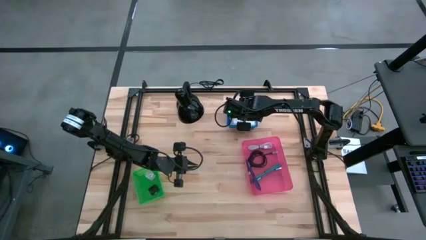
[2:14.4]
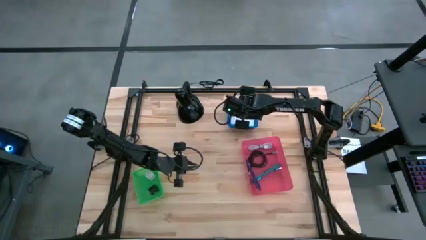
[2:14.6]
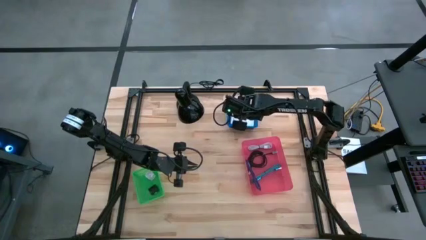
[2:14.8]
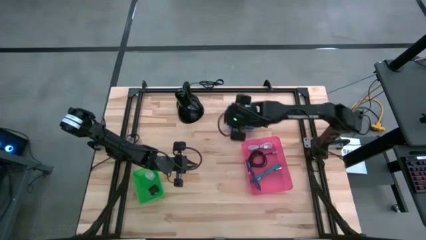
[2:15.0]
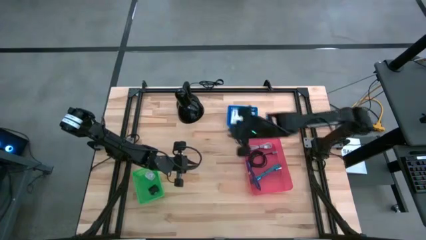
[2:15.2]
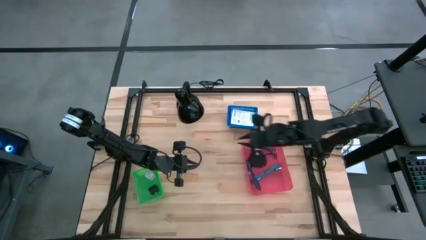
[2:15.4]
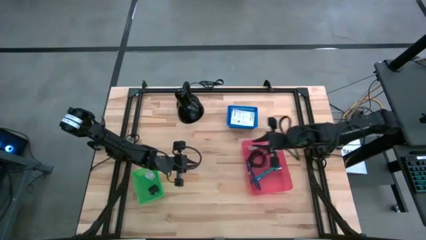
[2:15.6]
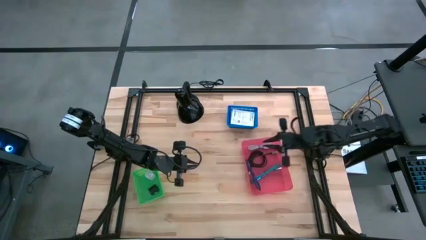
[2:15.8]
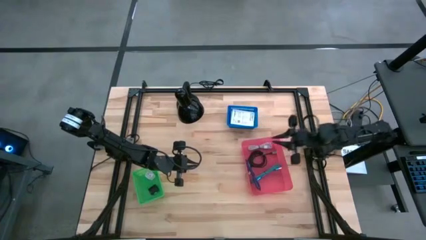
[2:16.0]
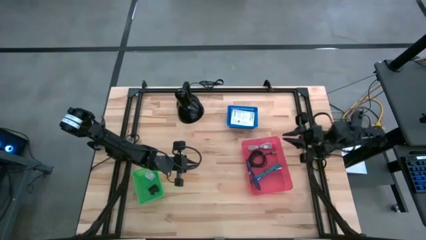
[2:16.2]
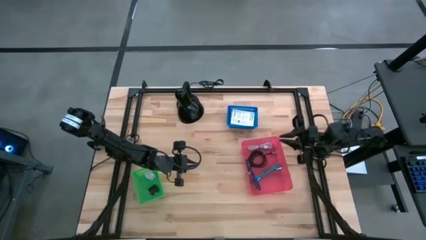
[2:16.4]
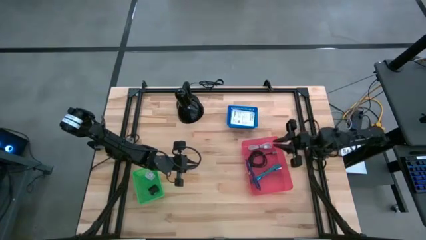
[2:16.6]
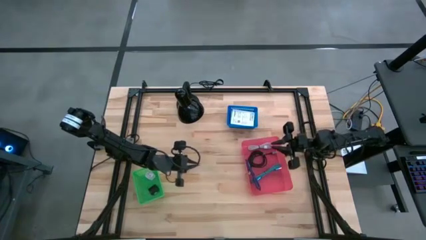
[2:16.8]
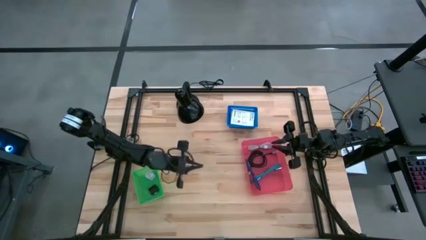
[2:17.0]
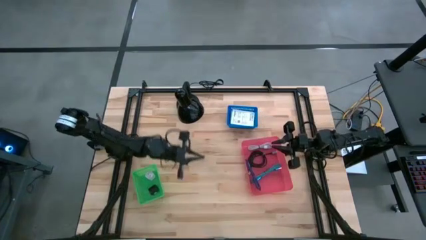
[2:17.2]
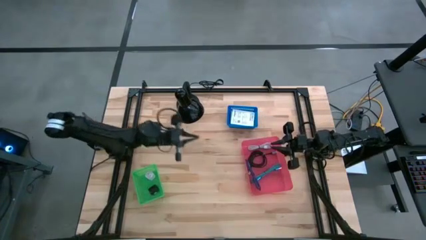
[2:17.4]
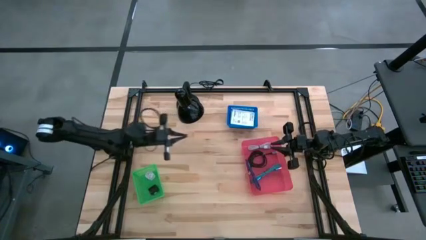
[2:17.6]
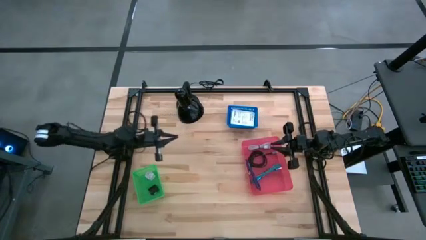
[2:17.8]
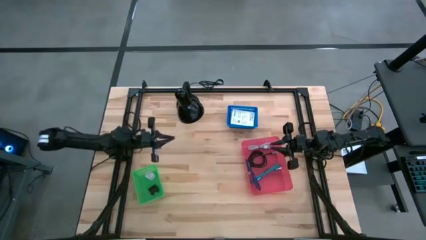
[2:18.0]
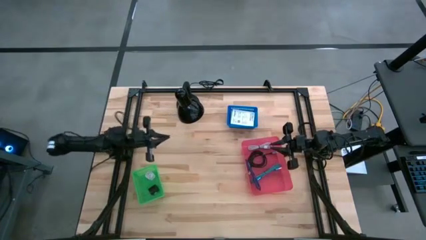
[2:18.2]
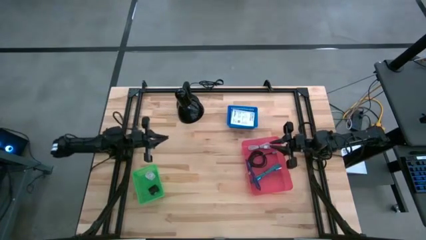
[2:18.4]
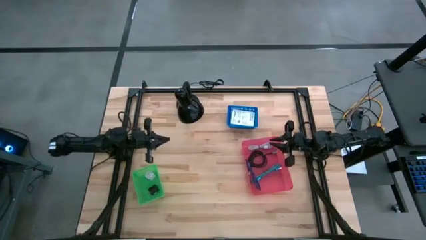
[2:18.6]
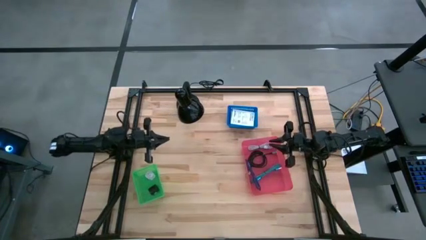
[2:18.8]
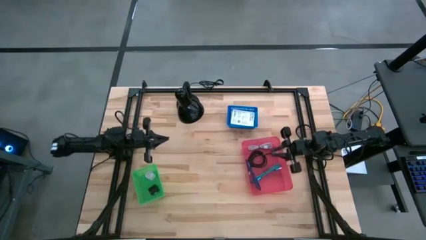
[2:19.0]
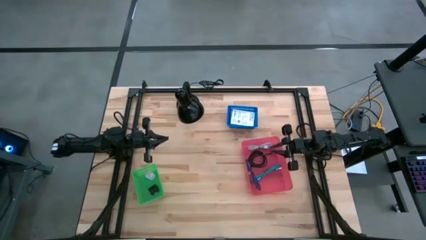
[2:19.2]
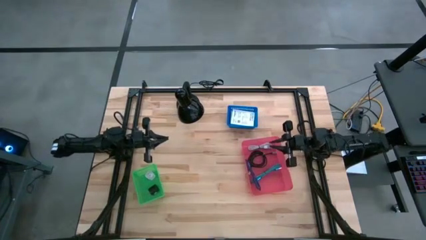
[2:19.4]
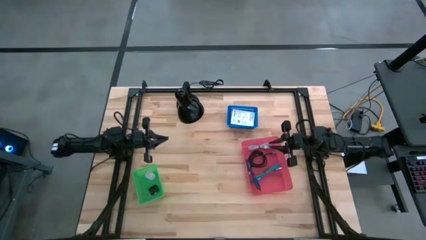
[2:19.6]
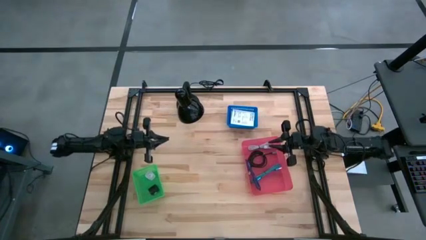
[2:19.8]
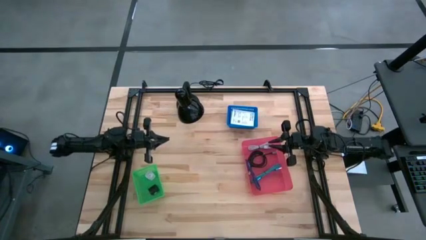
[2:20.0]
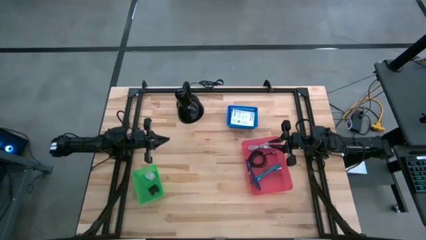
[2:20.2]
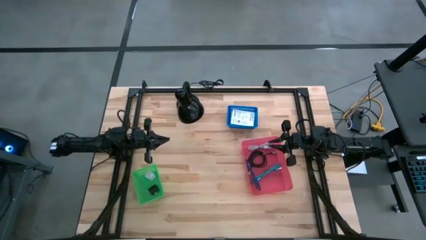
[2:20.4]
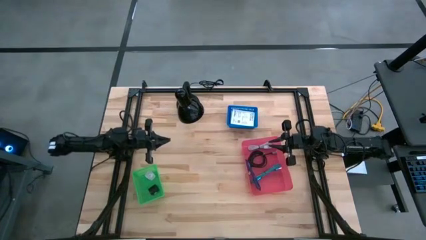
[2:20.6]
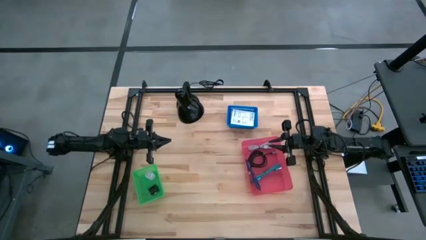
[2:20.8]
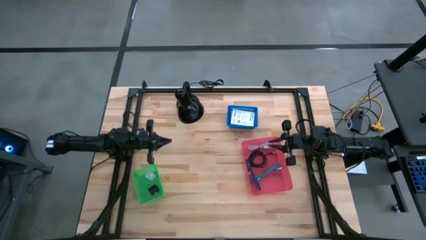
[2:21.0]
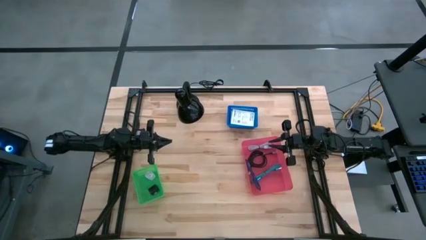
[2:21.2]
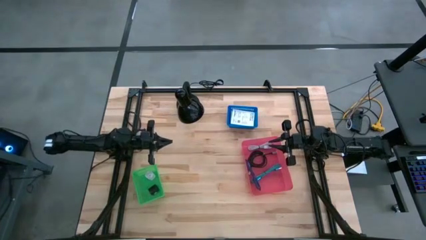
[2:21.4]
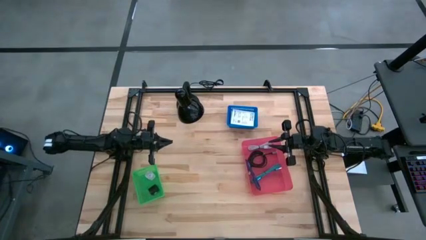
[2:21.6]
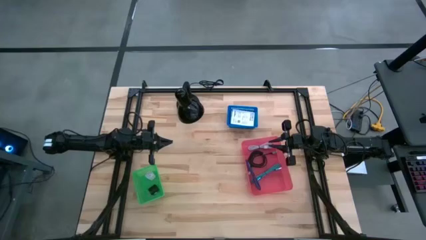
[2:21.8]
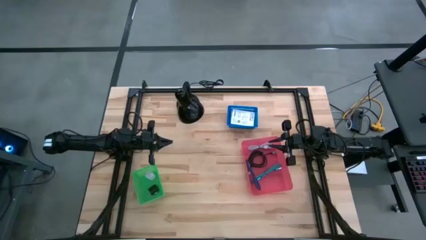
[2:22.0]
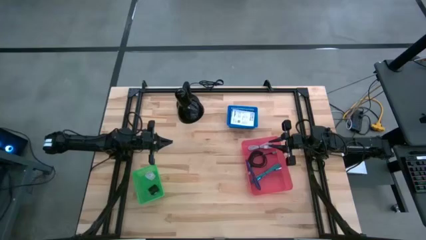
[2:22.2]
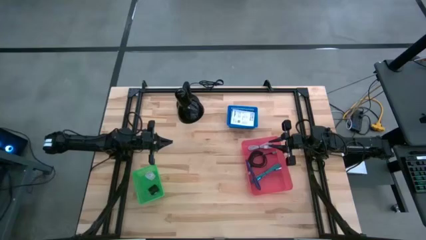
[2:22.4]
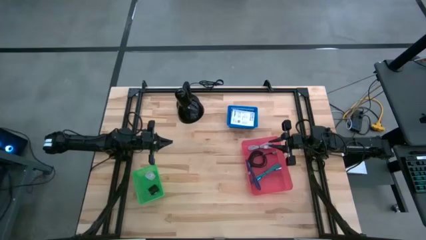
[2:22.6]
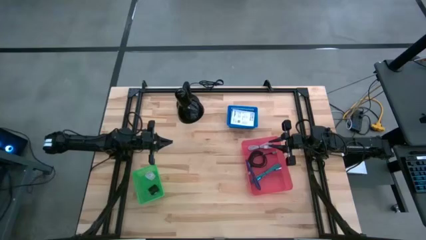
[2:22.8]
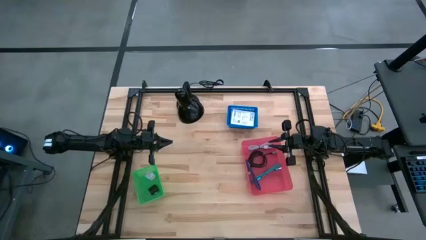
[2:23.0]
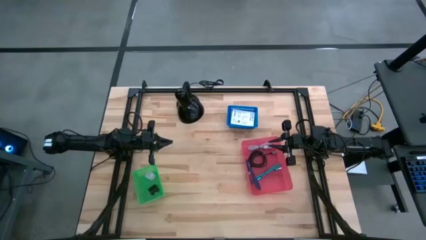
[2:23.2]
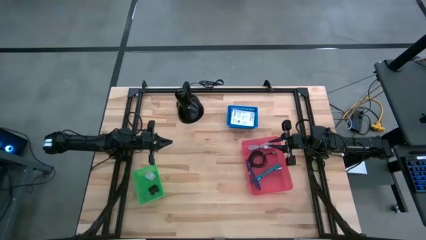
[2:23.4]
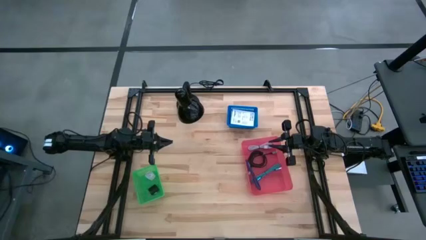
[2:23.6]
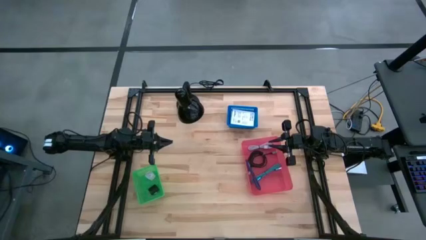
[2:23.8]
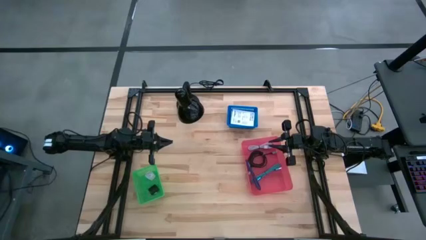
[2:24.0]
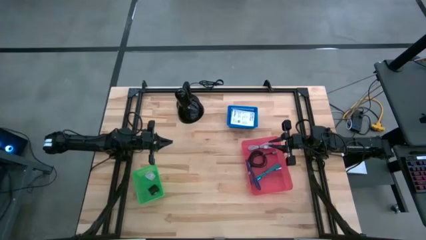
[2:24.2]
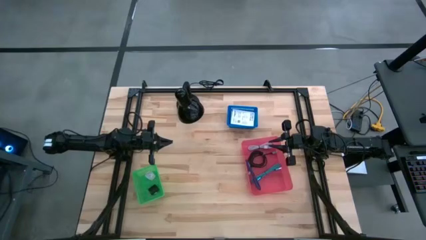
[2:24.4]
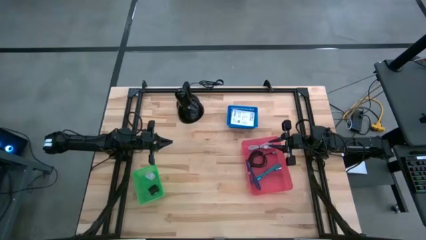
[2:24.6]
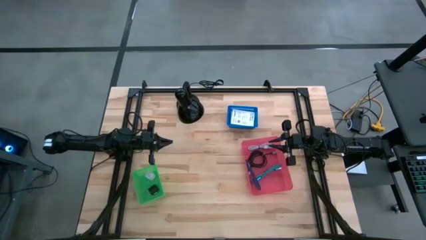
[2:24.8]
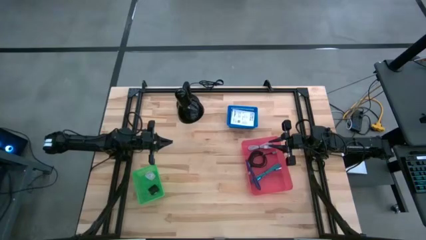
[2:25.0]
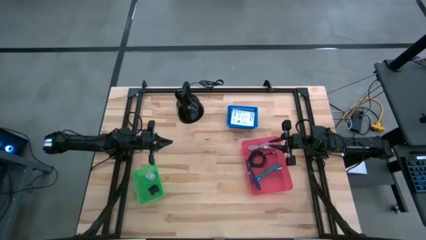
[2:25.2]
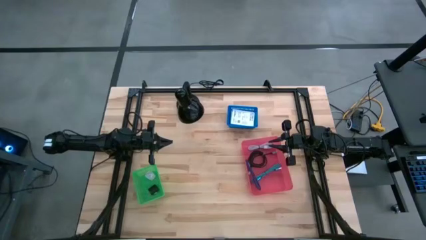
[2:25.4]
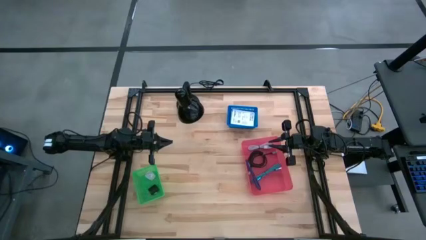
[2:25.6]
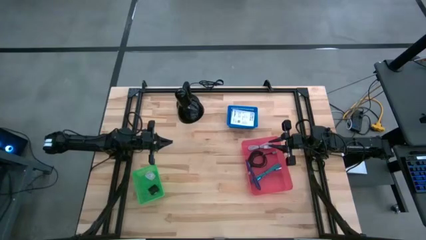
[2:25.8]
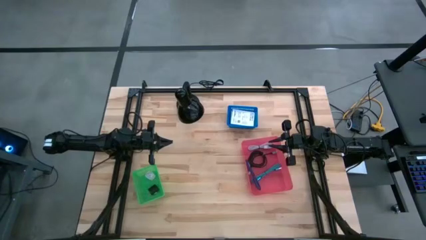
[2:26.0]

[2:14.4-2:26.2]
Task: Pick and place items into bin
Return to Home position

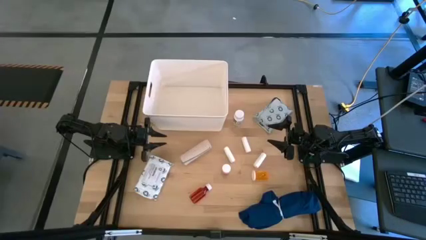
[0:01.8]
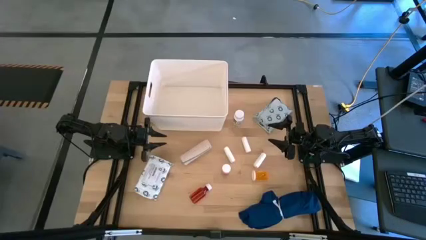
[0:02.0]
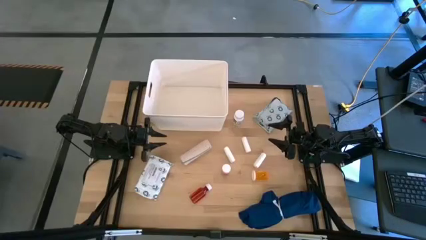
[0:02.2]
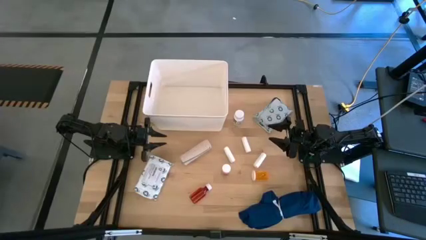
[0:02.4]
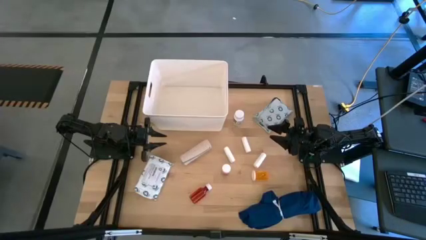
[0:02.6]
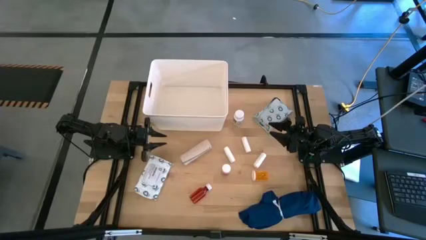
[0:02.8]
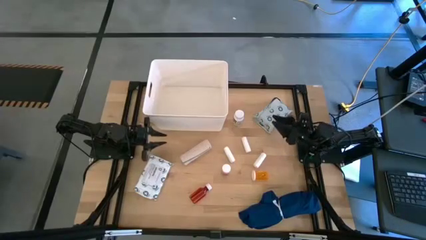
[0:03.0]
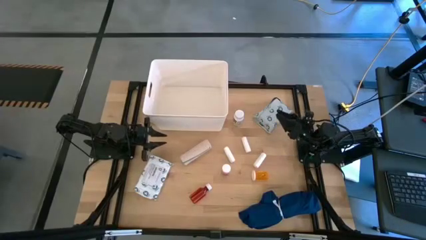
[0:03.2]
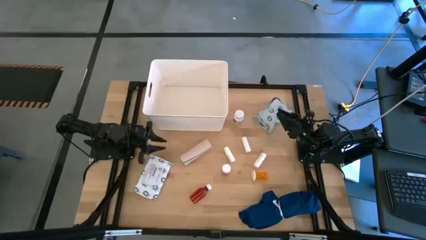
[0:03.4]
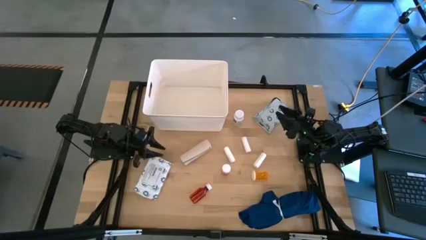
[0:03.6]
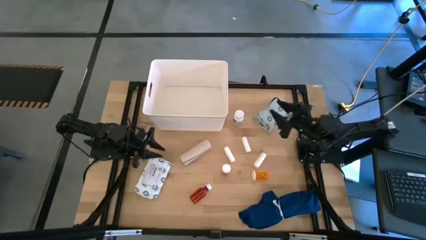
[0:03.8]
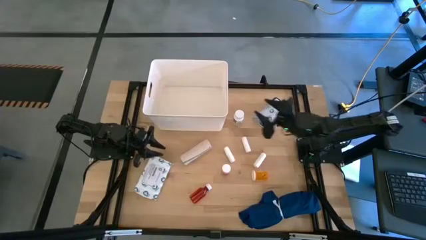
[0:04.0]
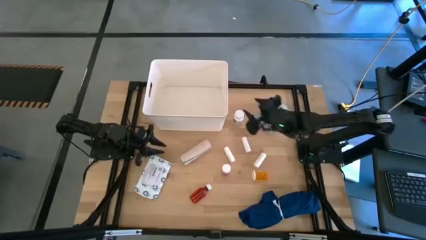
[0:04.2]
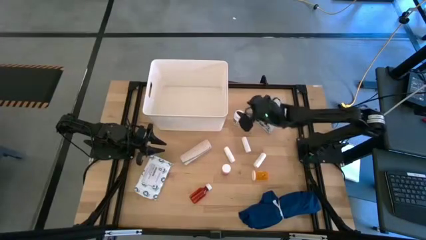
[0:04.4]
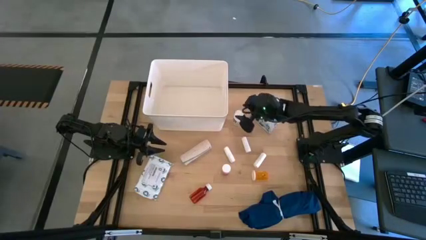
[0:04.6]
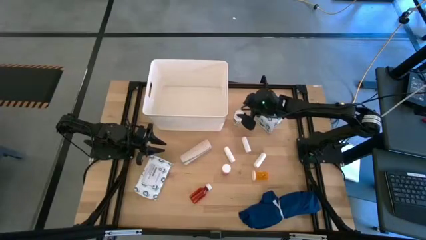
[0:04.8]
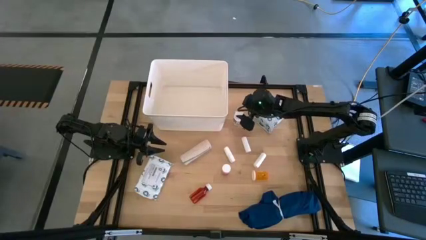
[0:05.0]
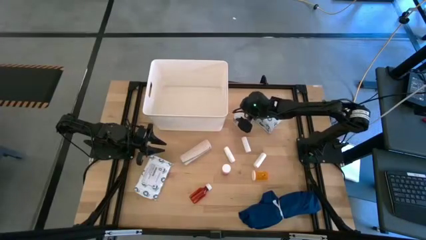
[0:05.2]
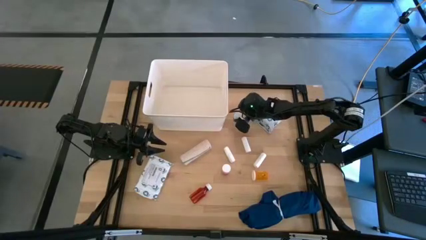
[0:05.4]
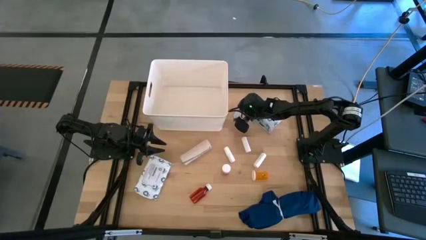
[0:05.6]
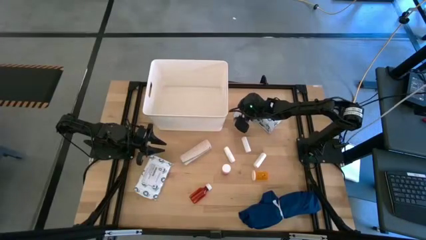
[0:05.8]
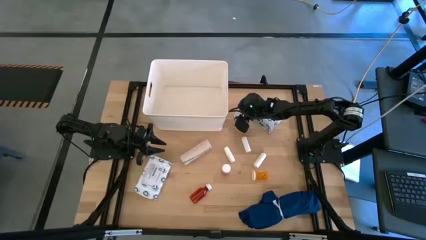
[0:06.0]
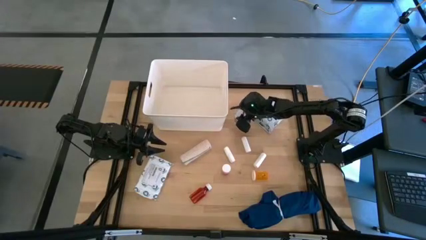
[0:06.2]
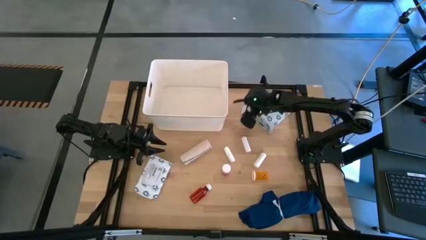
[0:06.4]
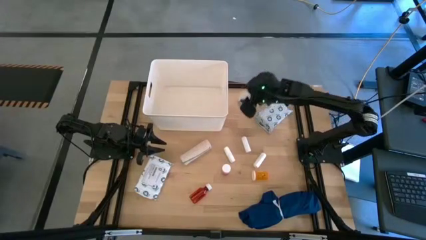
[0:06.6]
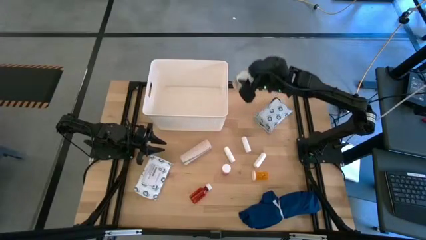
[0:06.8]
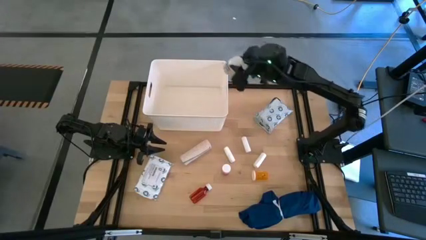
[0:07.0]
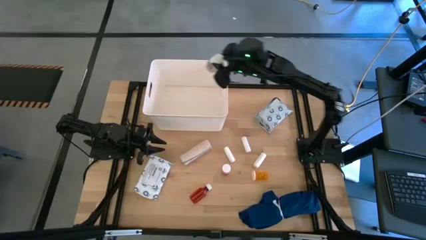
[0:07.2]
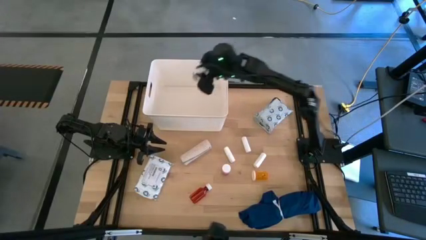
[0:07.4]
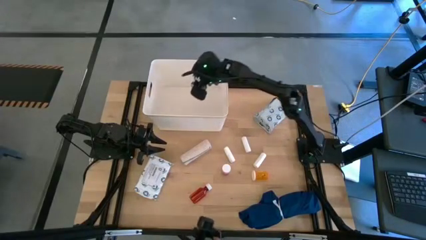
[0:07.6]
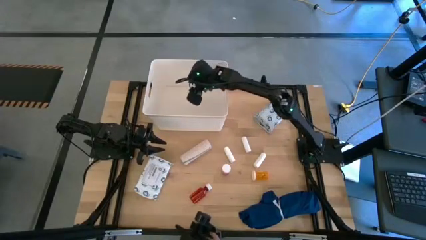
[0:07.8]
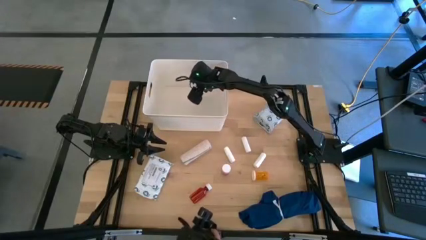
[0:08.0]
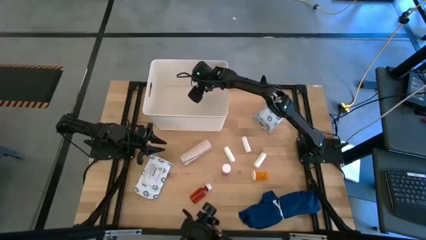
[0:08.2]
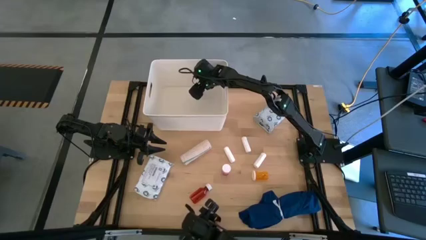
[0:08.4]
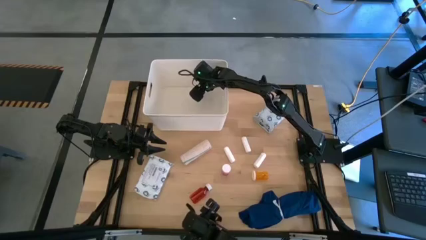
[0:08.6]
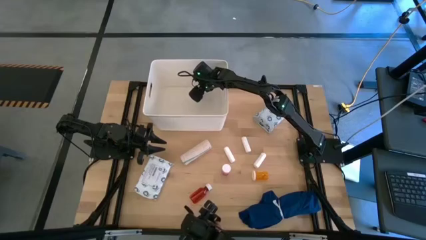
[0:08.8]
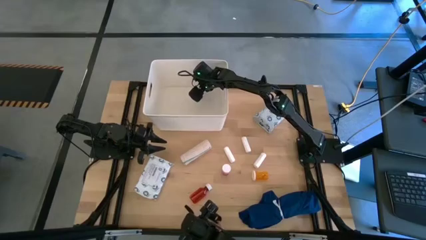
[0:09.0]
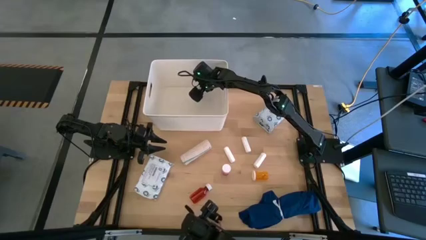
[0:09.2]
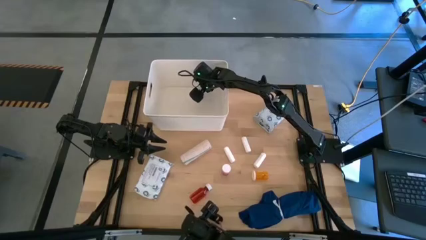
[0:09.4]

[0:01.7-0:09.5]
Task: Pick & place medical supplies in basket/bin
Put the white medicine bottle into the white bin
